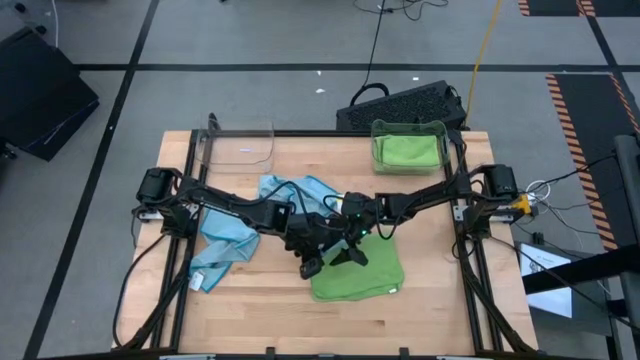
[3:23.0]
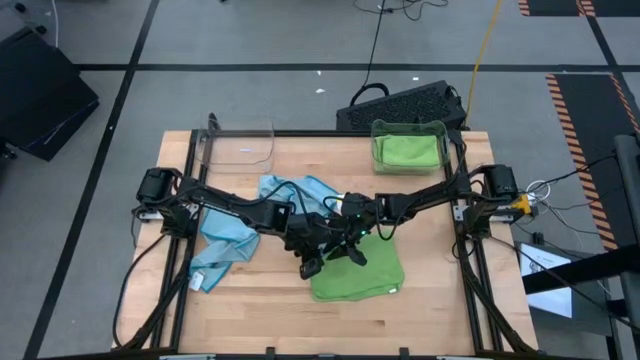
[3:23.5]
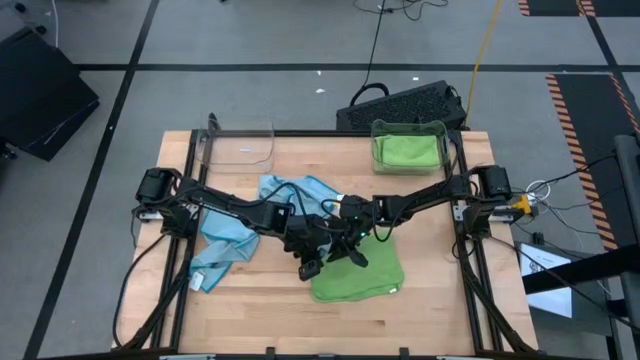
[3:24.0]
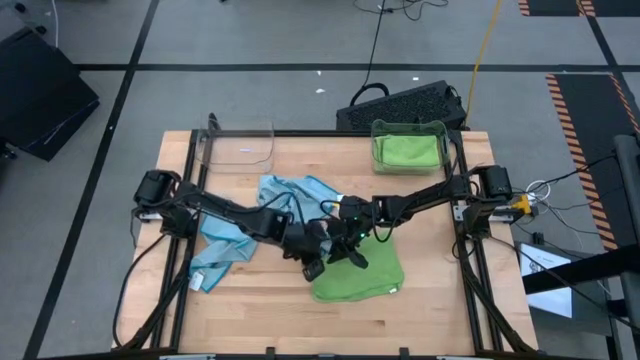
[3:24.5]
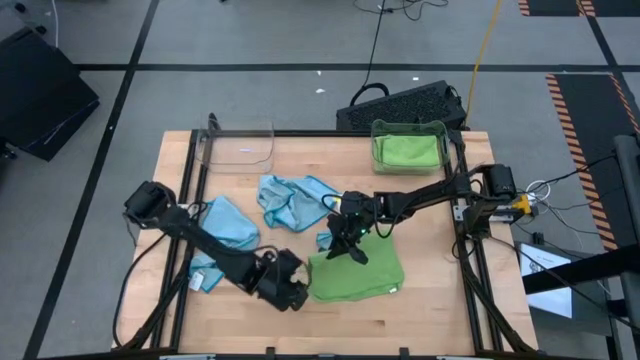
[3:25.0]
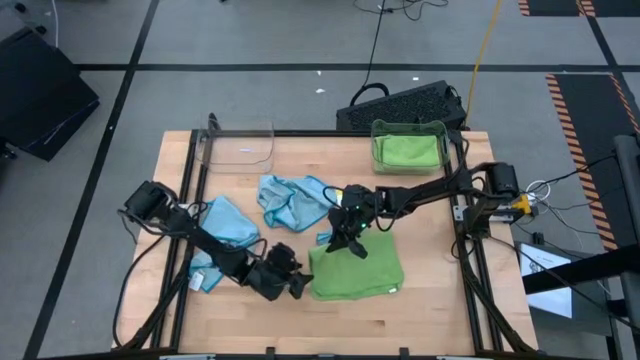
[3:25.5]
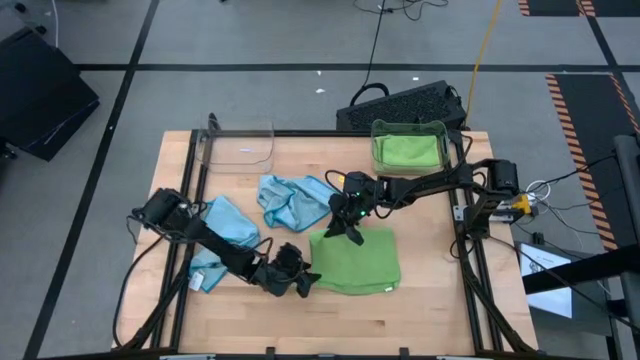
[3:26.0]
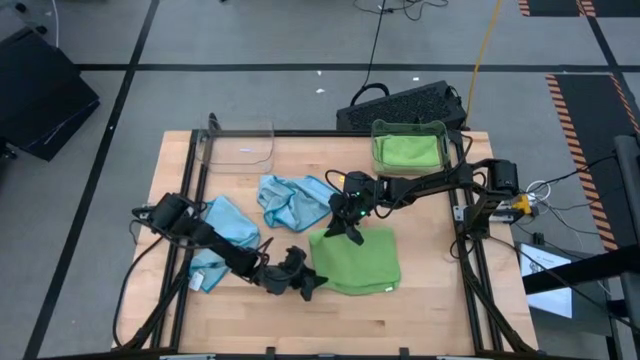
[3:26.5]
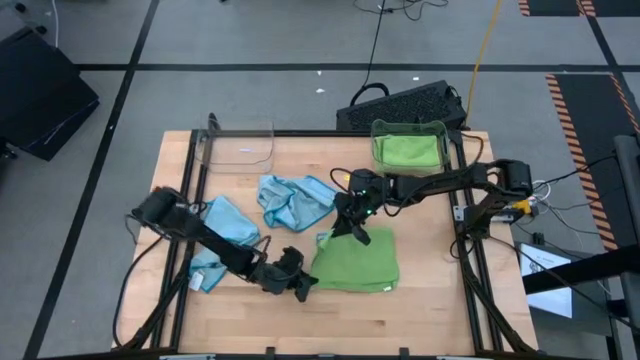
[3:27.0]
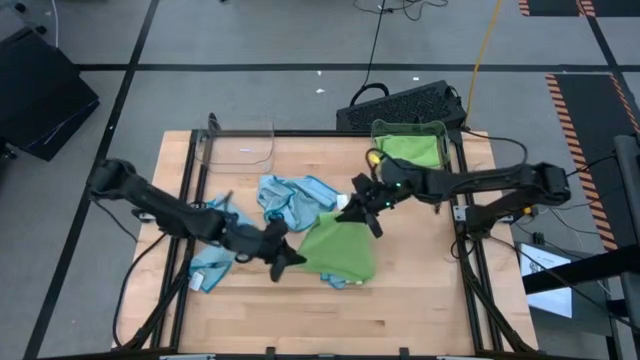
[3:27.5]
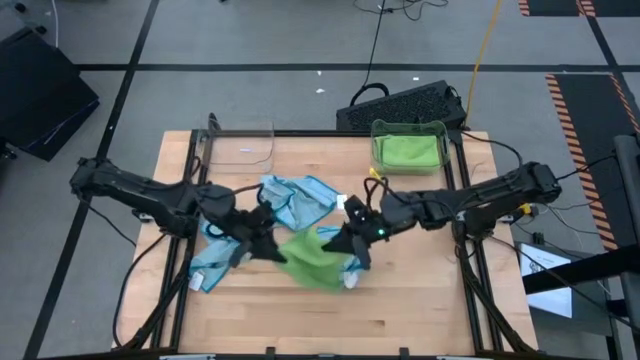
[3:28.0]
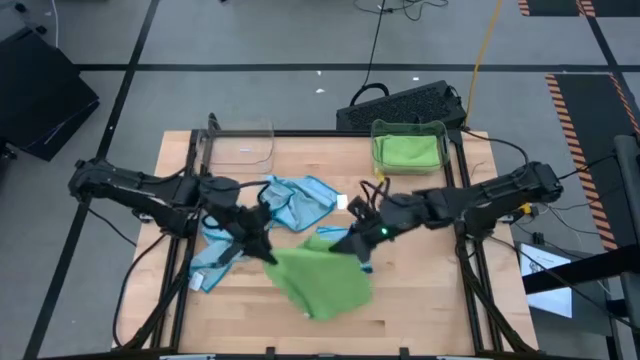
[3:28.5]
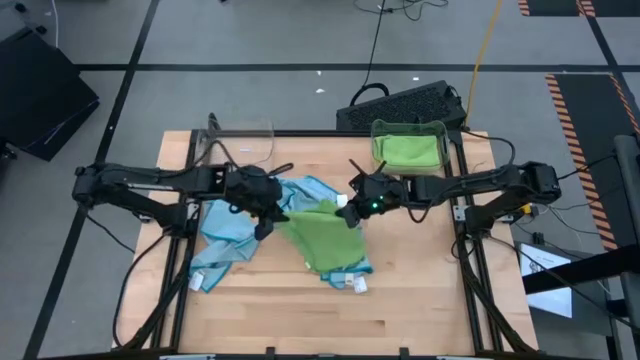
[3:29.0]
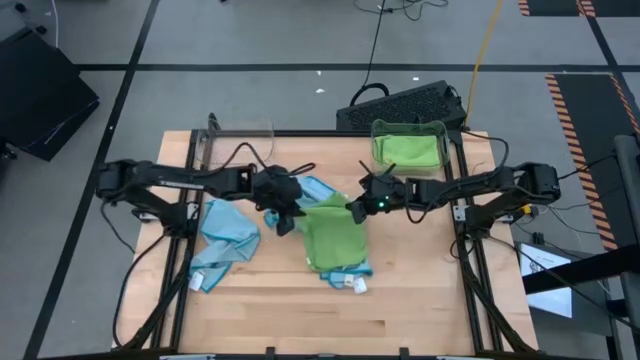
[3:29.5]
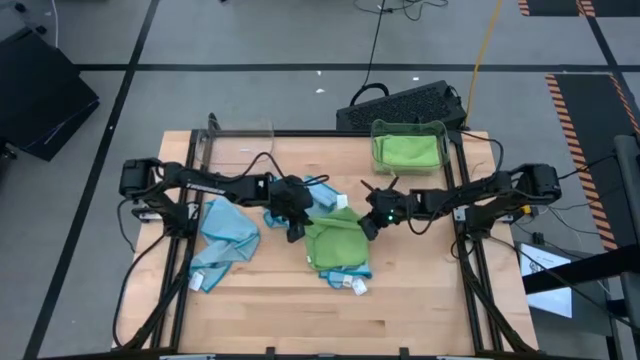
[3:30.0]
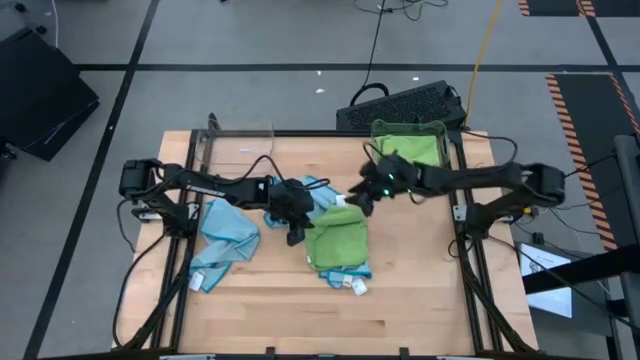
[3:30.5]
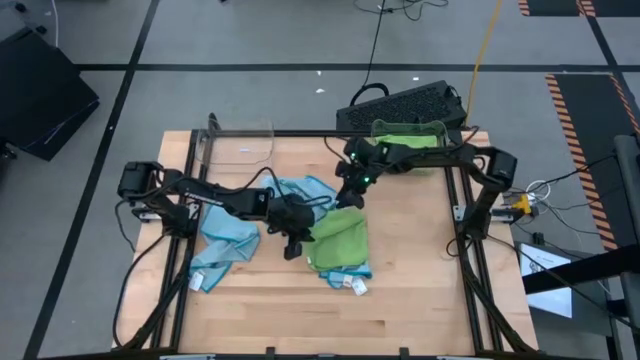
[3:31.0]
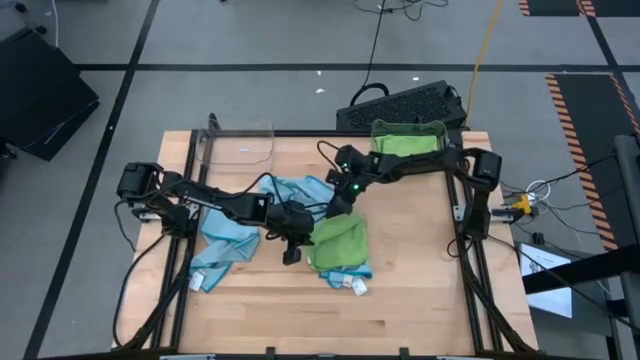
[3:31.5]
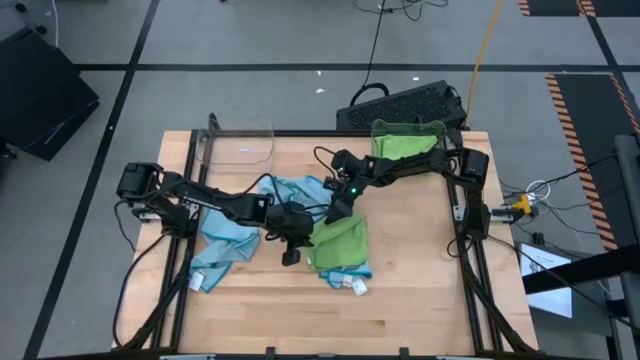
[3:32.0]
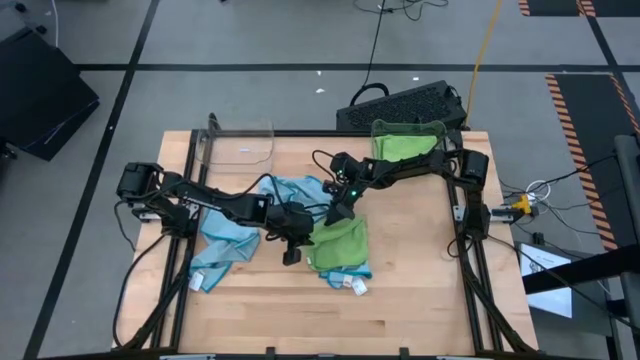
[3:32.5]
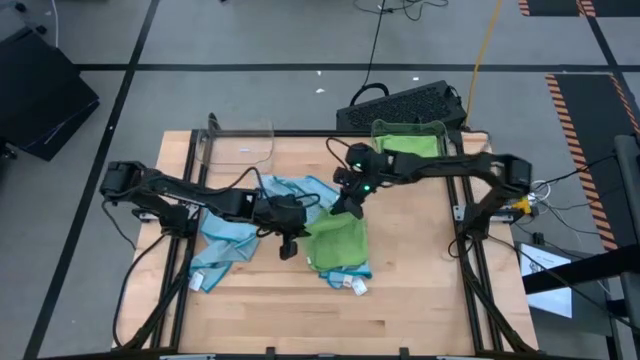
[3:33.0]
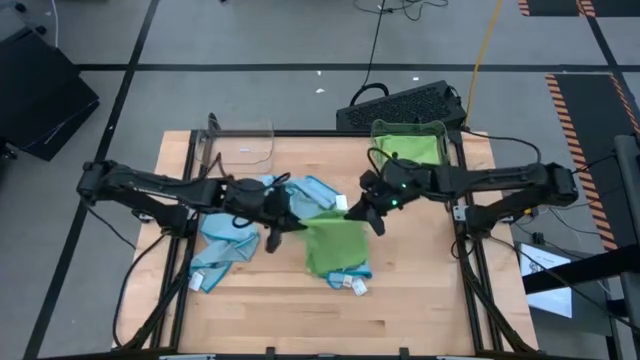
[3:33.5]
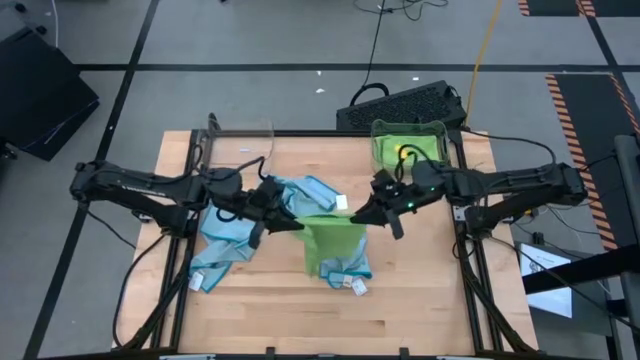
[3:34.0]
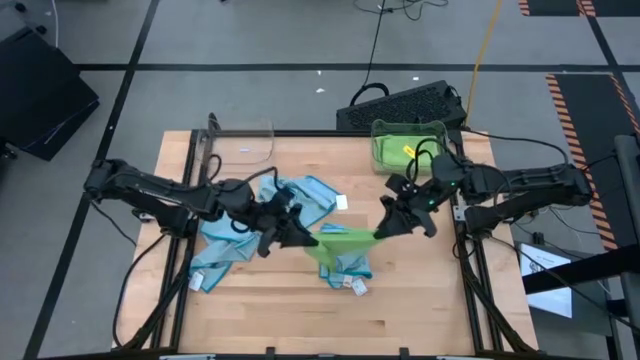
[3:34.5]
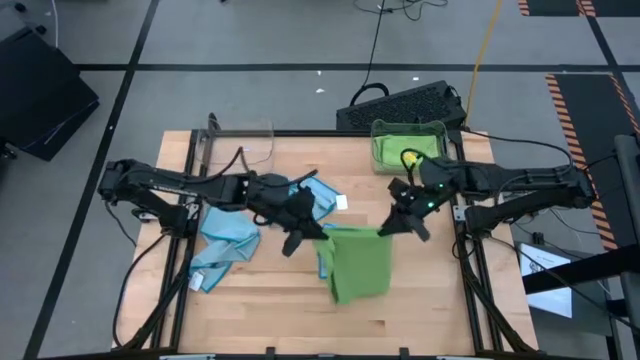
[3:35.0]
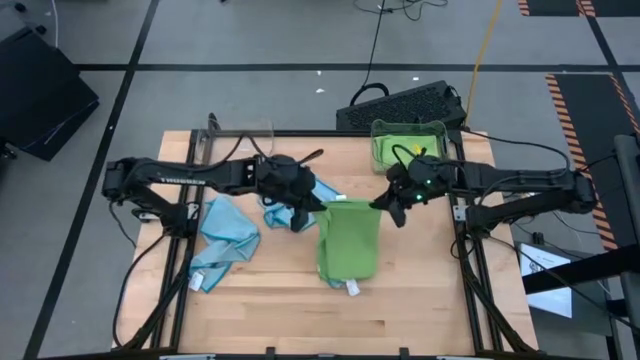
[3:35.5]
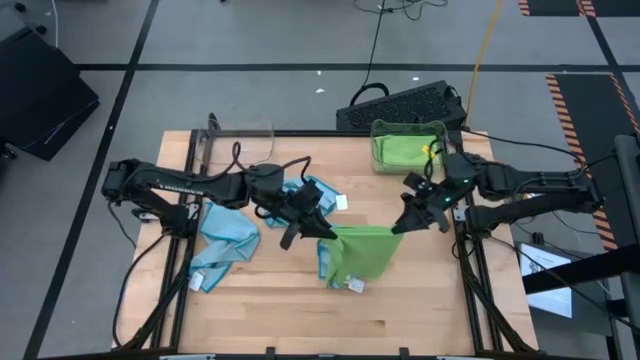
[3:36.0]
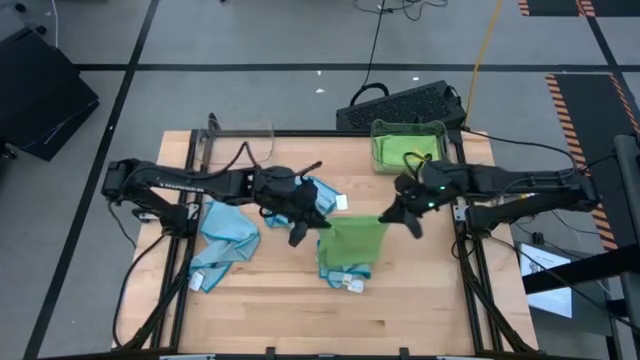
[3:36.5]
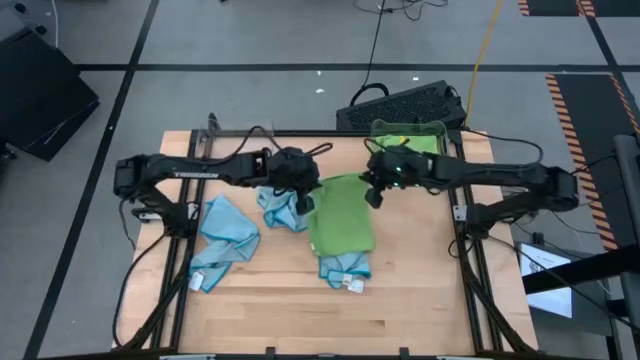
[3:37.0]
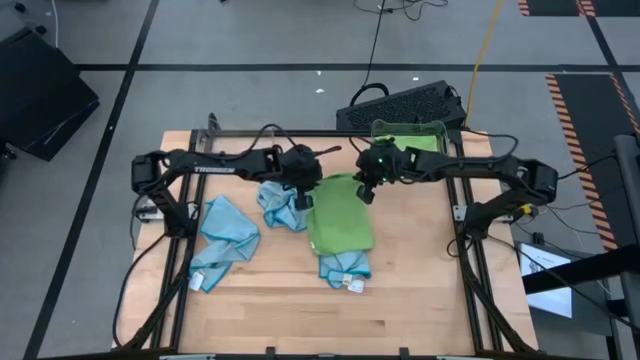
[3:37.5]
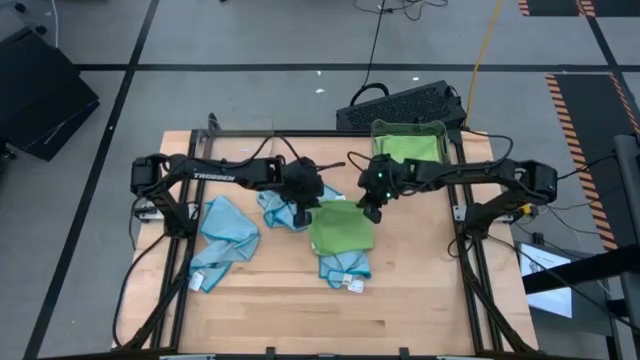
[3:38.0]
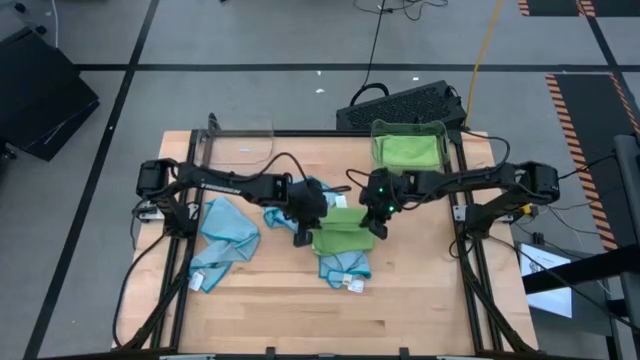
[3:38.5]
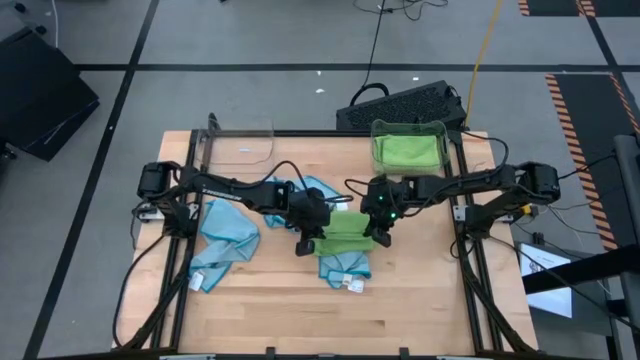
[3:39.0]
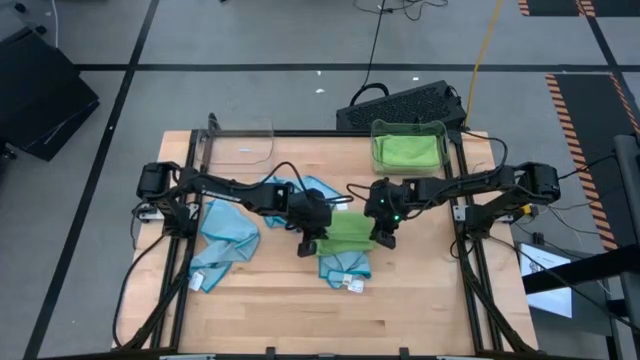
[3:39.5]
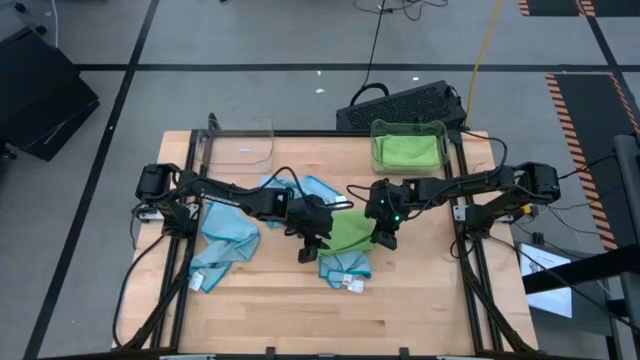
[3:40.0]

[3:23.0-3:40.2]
Task: Sort microfiber towel by color & place in baskets
Fold the green towel

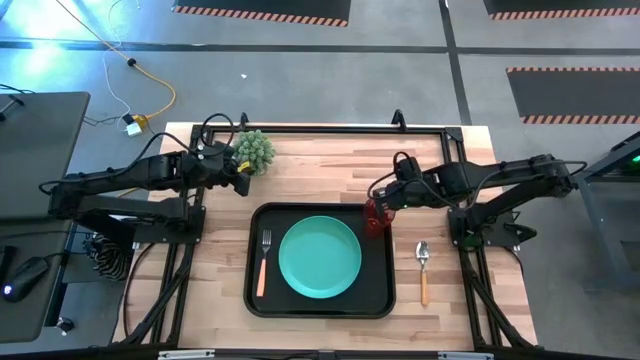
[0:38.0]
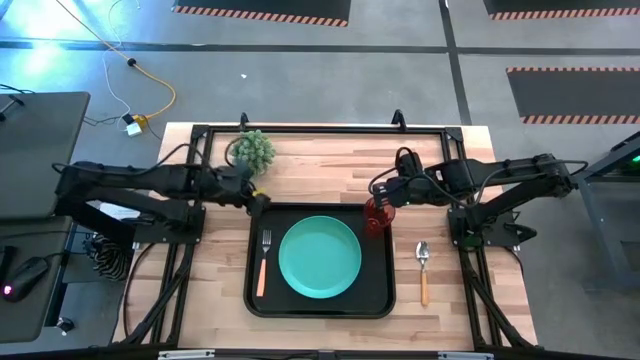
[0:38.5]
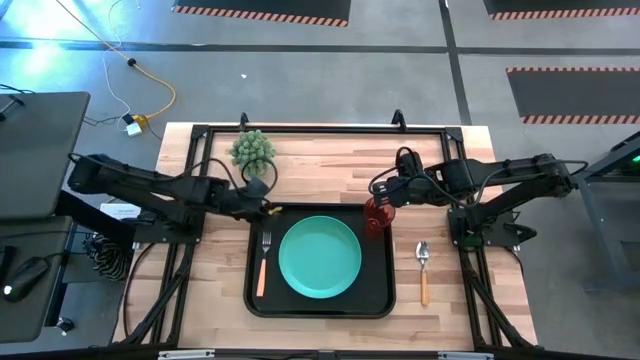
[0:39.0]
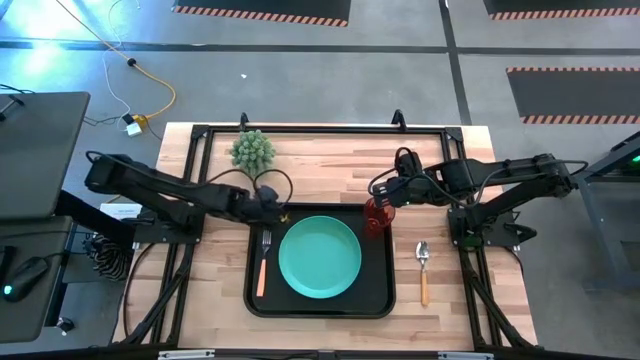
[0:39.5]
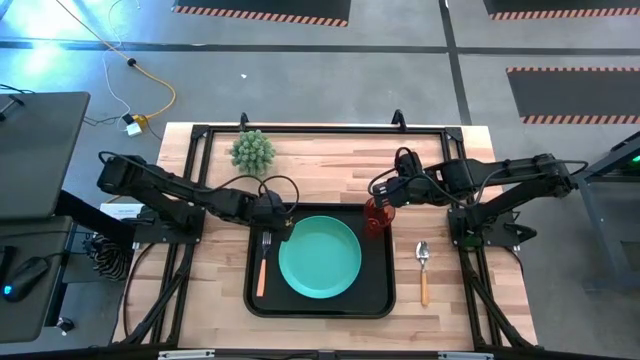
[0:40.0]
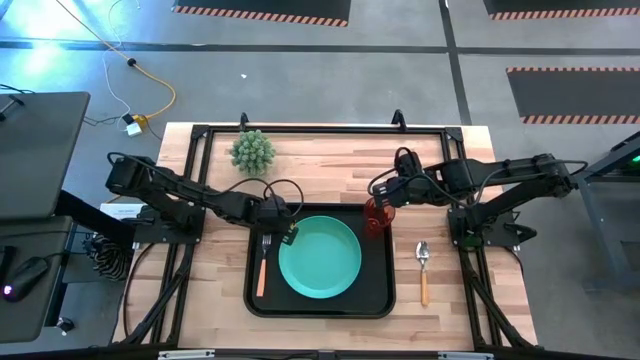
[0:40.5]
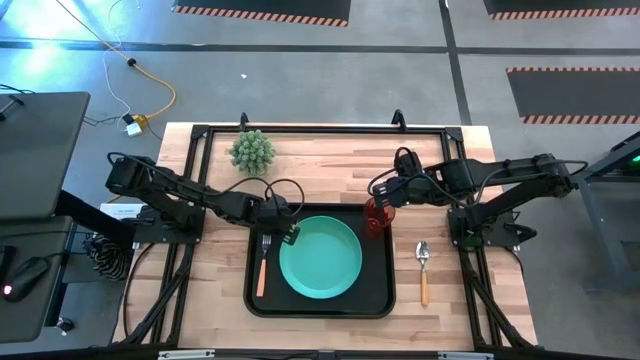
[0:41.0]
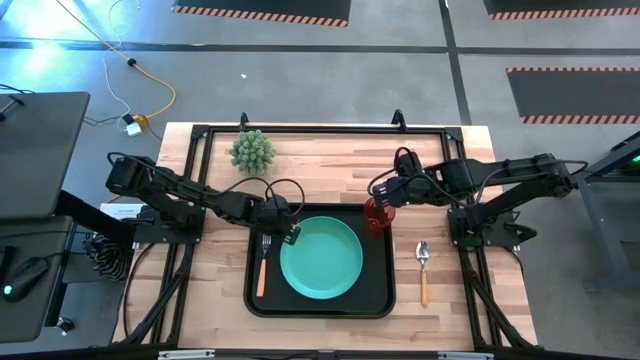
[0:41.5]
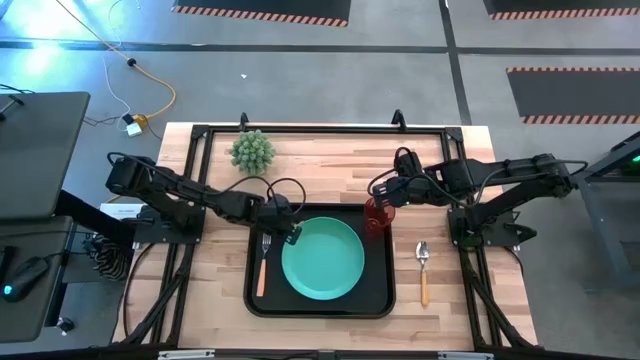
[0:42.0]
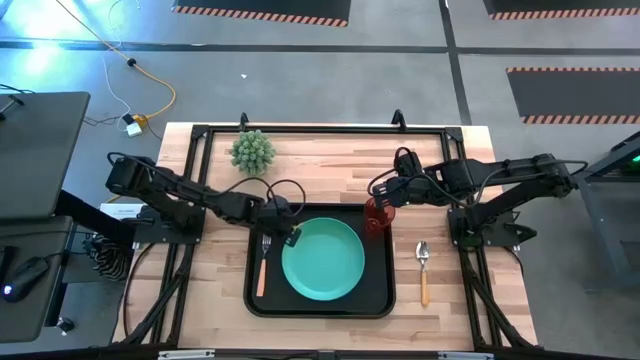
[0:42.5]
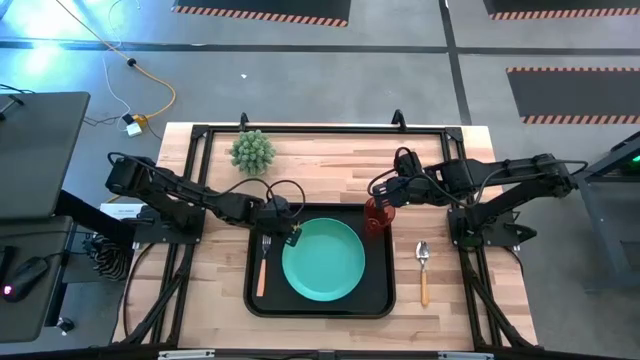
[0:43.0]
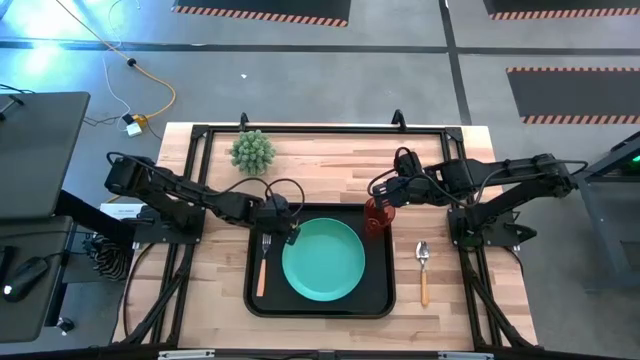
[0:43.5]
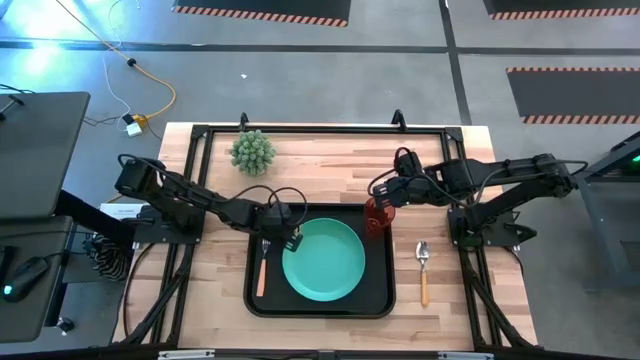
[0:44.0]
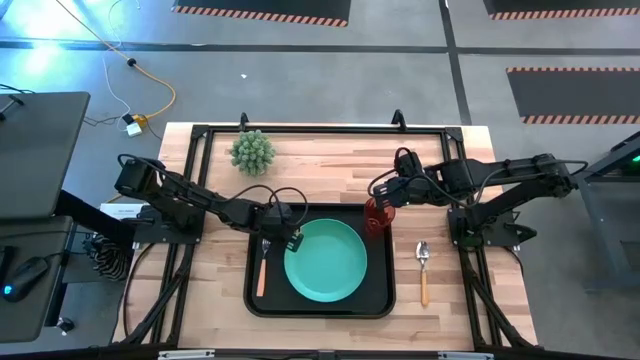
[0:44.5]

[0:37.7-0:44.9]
Task: Pick and place plate/cup/fork/spoon on tray
Adjust the blue plate
